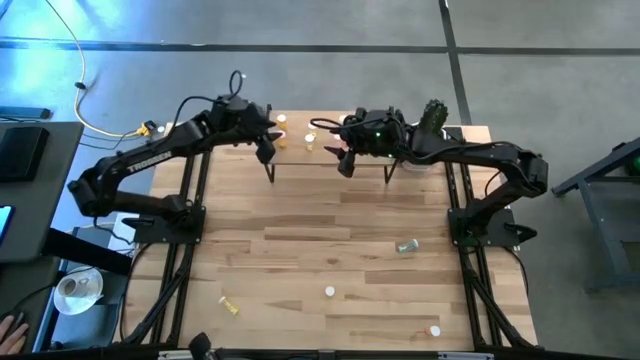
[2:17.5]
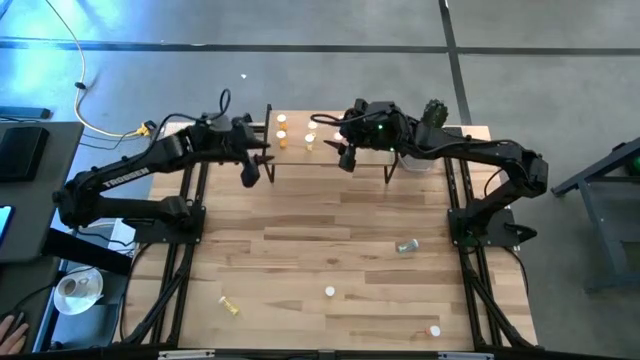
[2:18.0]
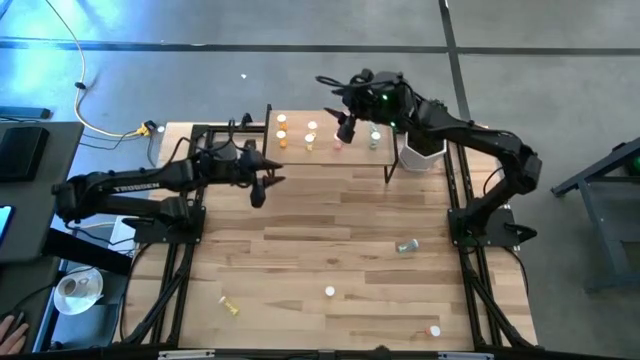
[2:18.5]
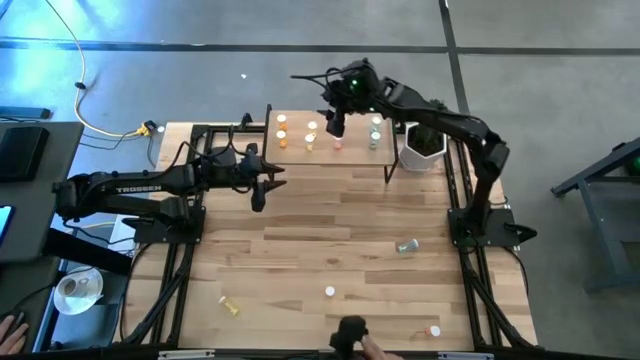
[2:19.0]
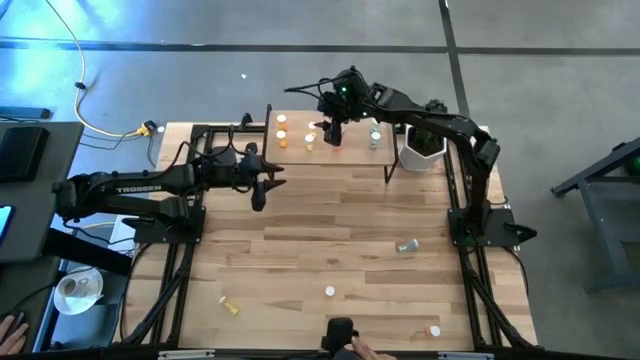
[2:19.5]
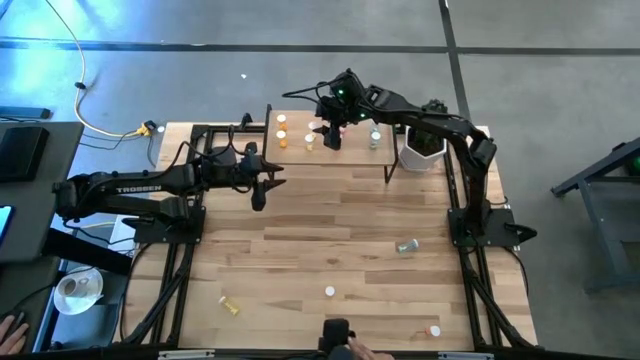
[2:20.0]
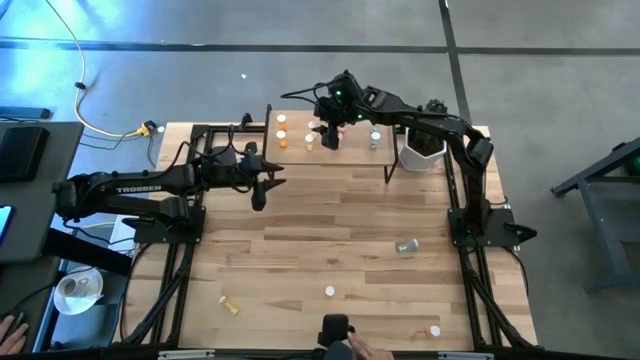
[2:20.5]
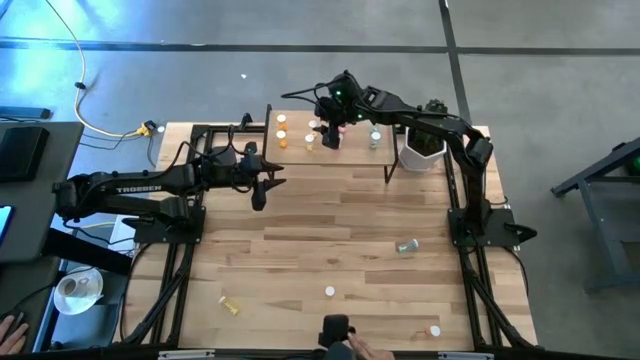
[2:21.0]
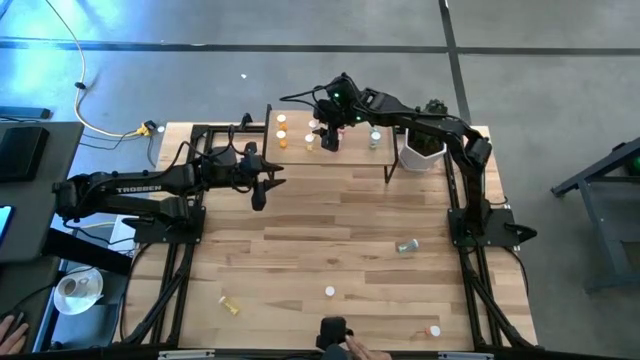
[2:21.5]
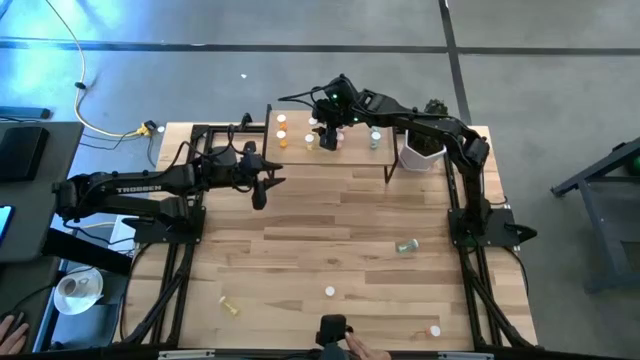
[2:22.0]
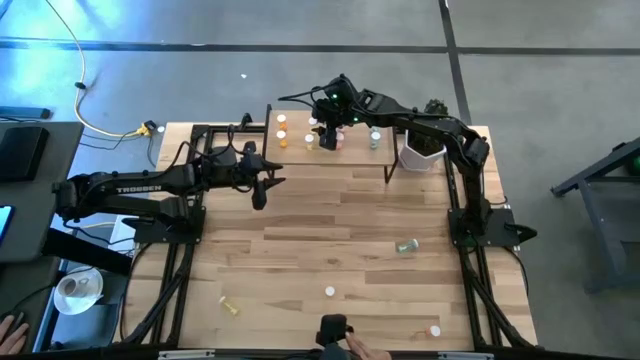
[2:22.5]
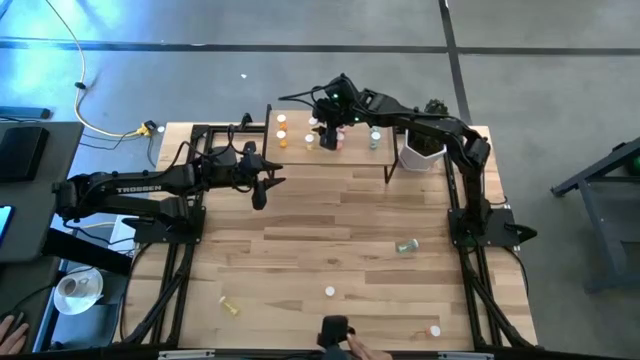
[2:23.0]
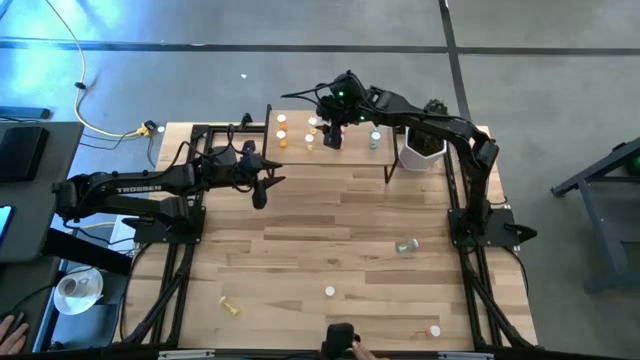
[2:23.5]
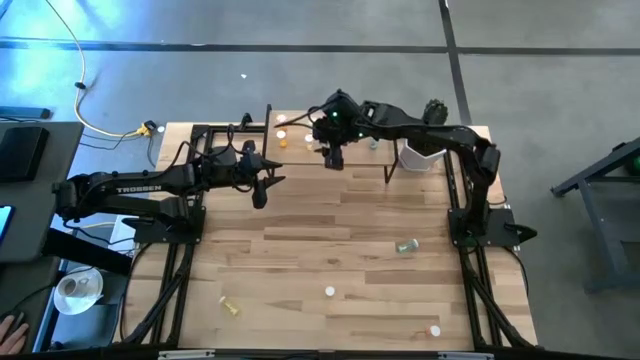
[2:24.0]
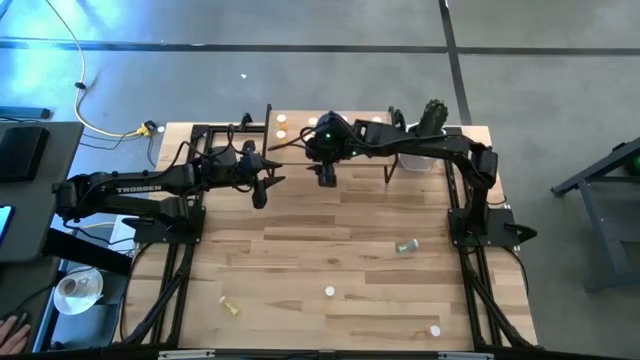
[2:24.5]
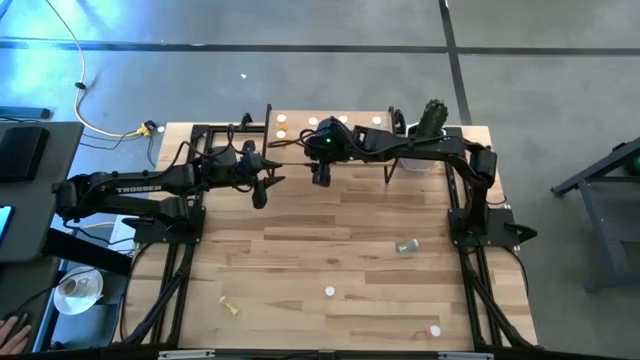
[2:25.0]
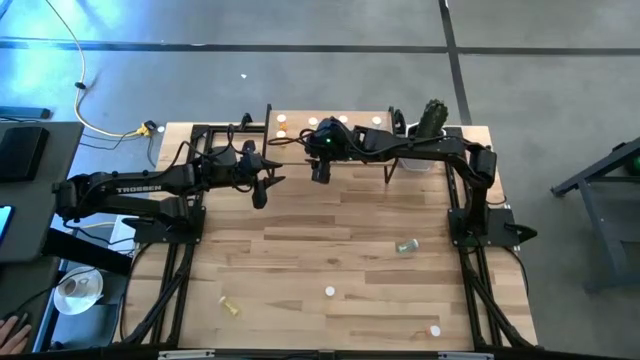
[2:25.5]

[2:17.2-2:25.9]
Task: Pick and place medicine bottles onto shelf by color
Adjust the yellow pill bottles on the shelf

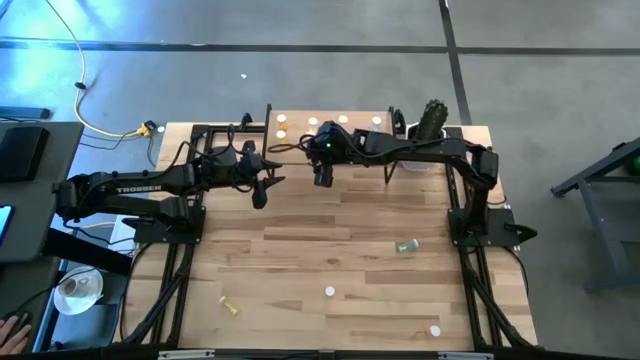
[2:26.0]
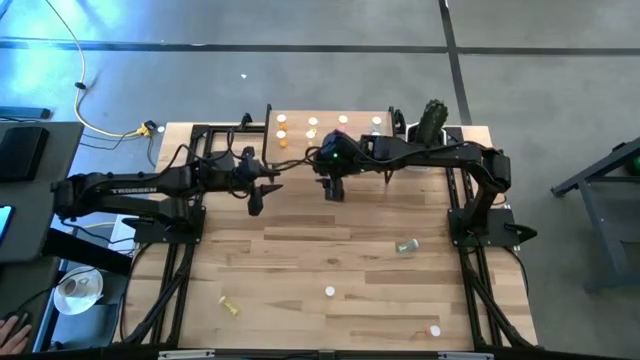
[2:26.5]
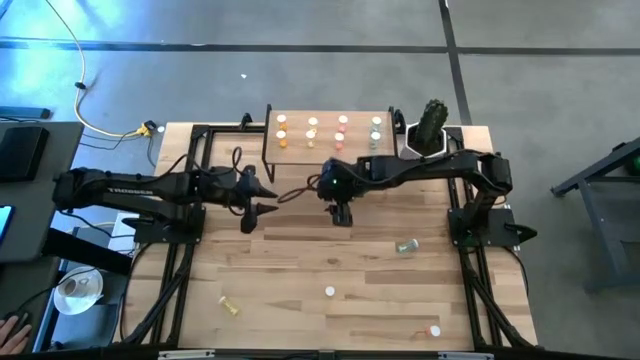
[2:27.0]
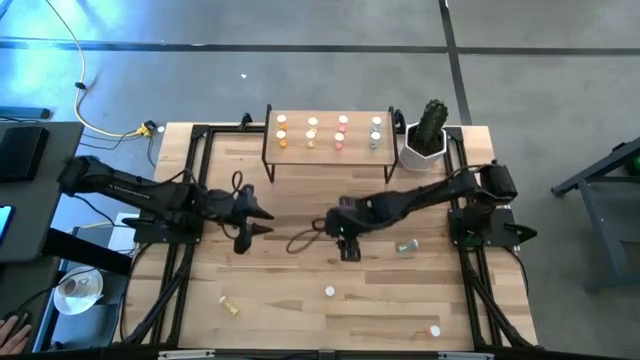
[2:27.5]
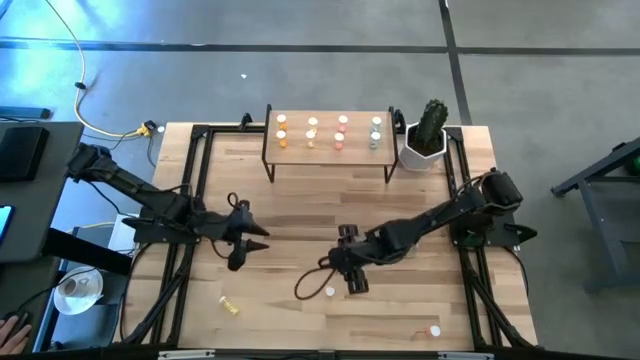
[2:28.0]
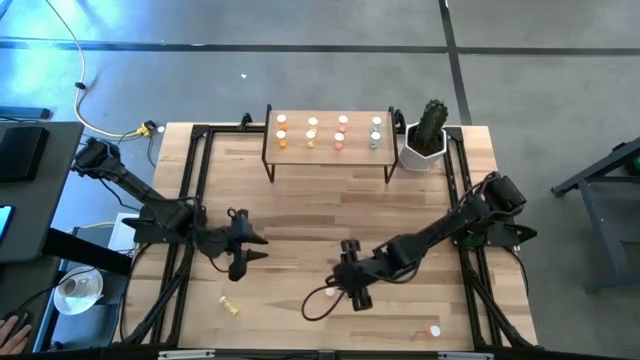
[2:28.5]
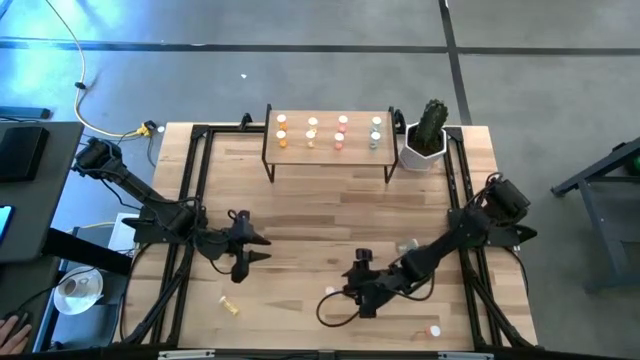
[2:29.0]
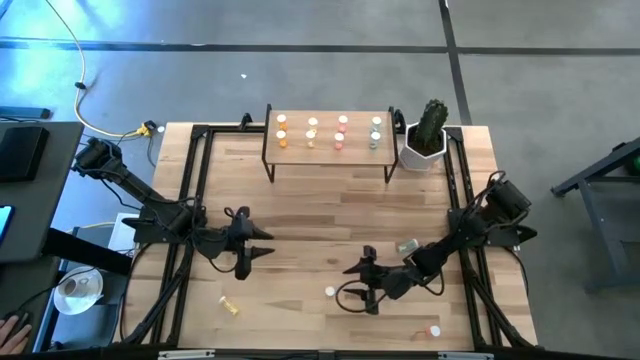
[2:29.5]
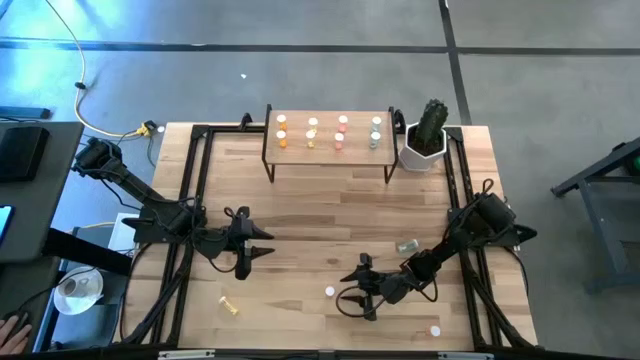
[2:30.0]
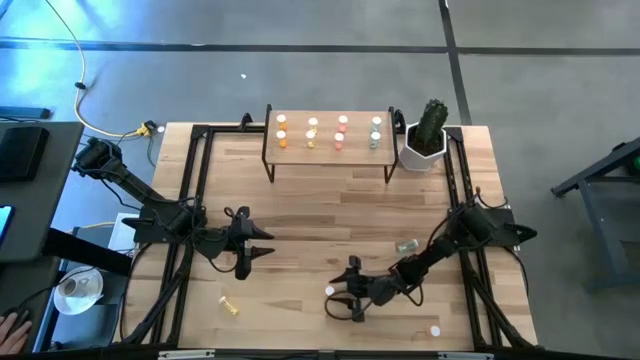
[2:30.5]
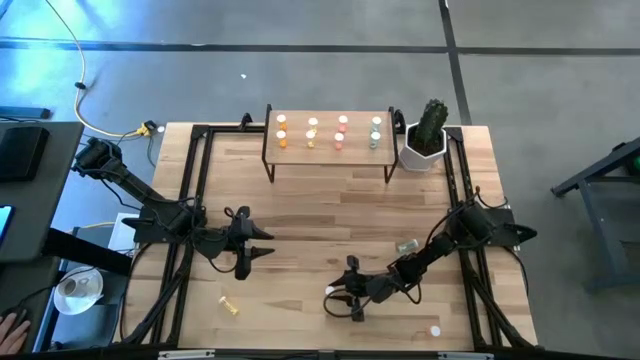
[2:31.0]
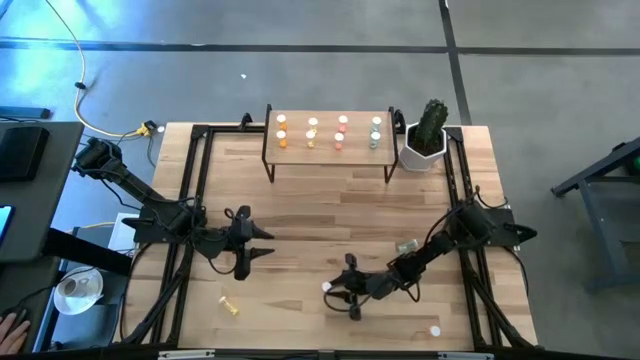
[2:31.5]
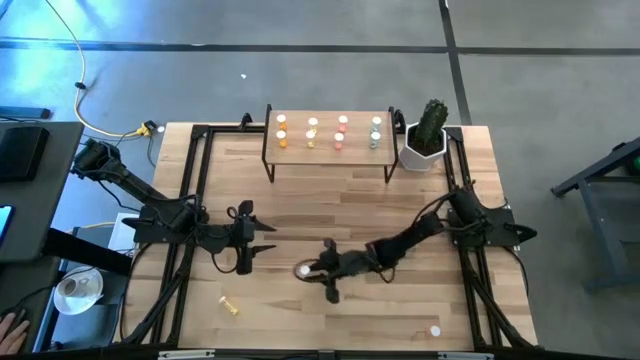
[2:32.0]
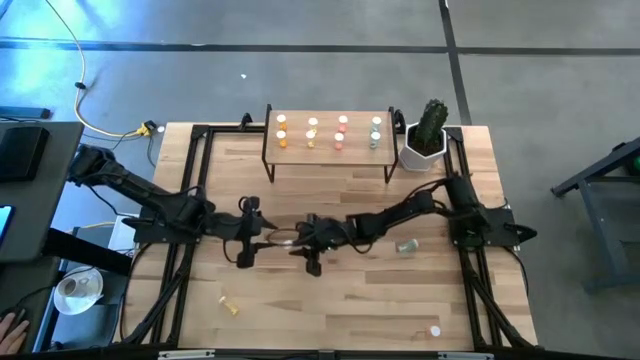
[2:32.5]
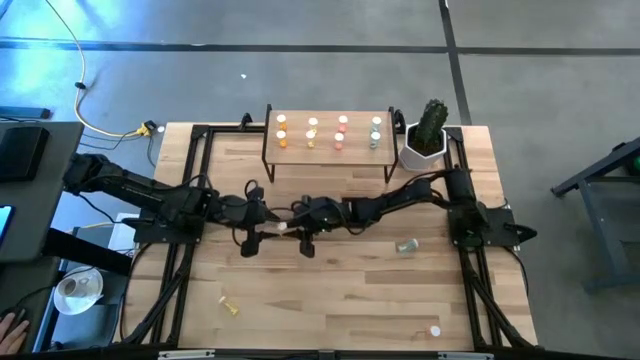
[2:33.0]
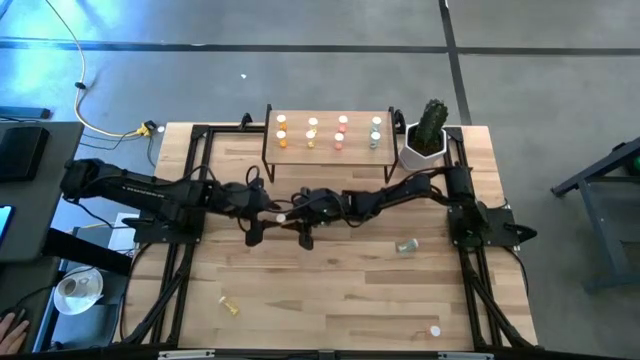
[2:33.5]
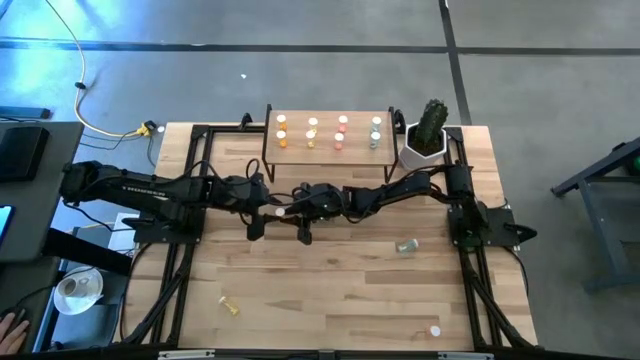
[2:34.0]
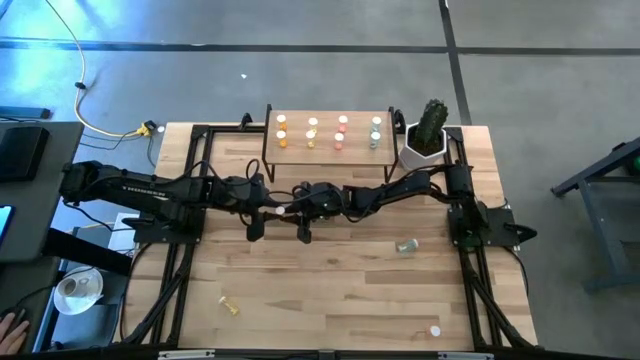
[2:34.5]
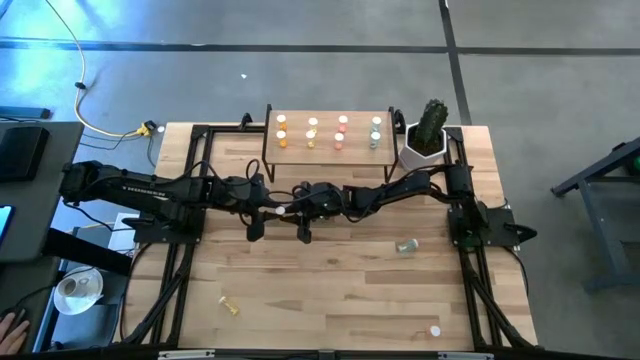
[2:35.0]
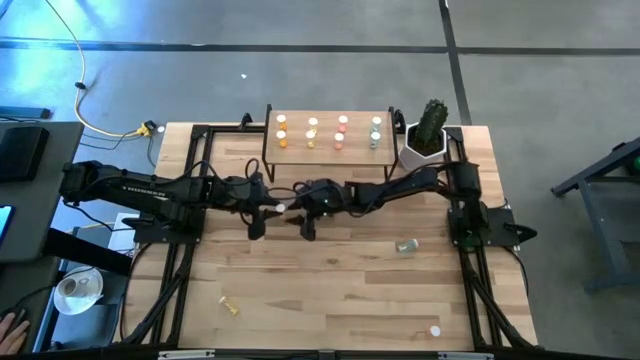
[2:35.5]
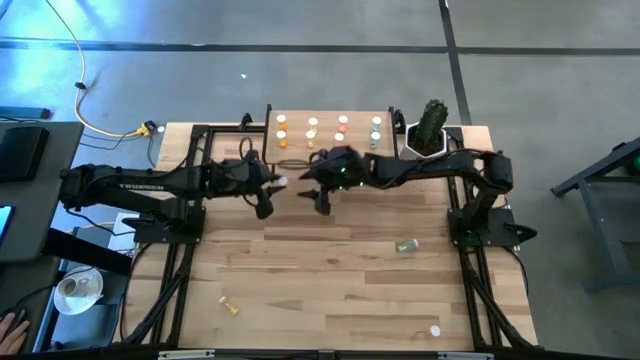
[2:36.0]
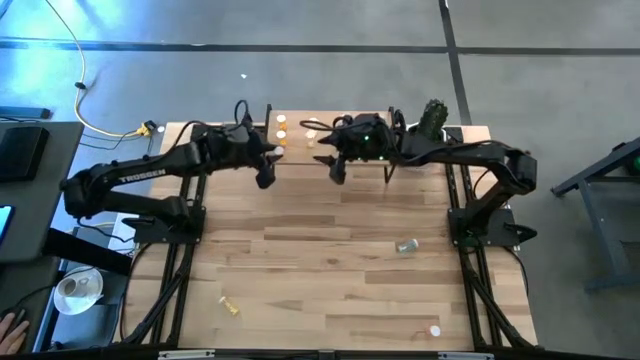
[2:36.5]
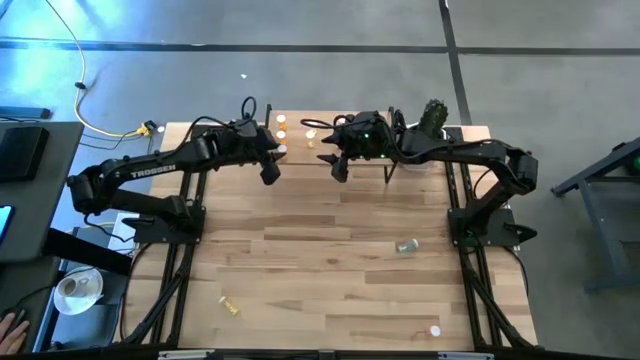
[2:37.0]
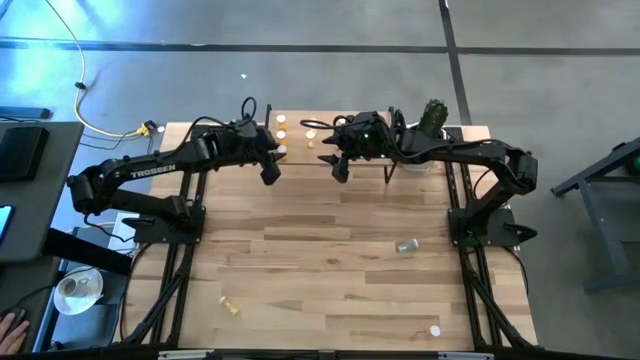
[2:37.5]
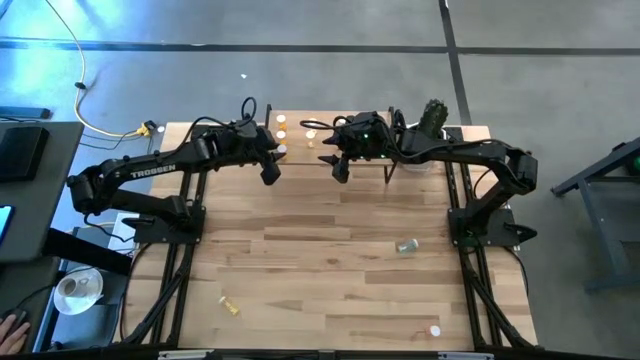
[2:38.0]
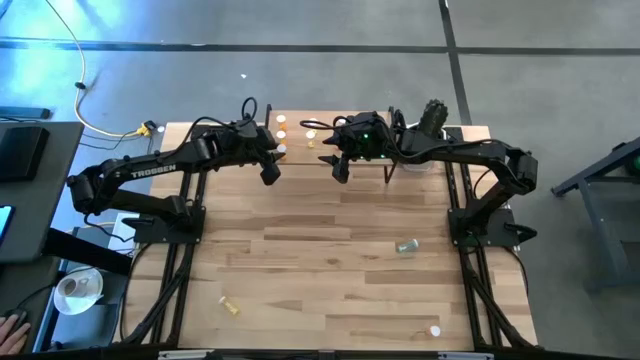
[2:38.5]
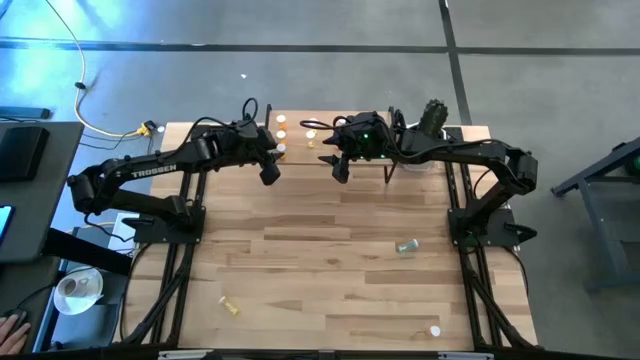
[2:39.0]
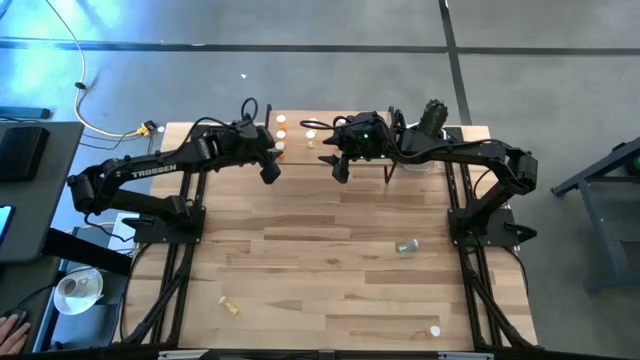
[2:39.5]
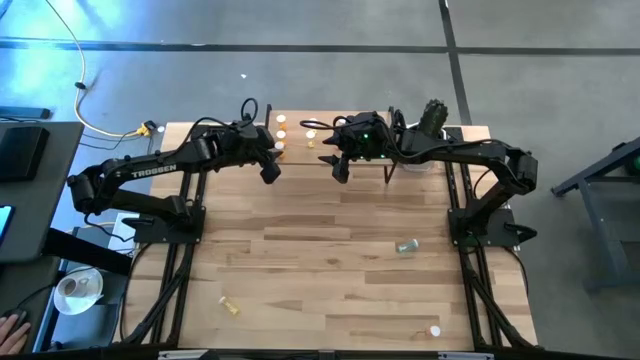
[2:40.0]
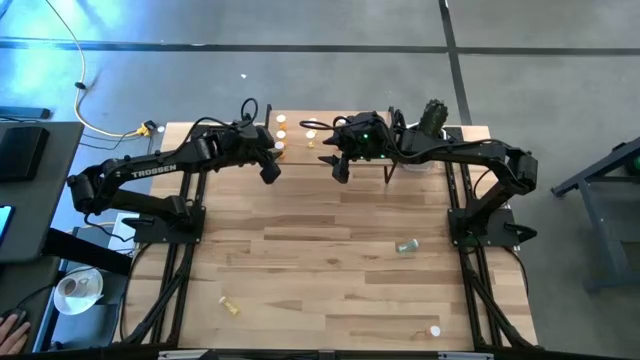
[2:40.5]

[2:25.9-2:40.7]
Put the orange pill bottle on the shelf aligned with the other orange pill bottles
